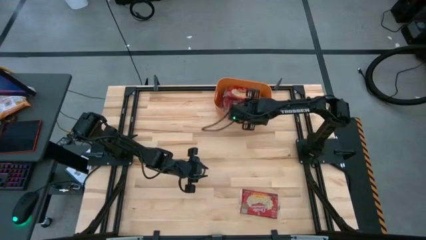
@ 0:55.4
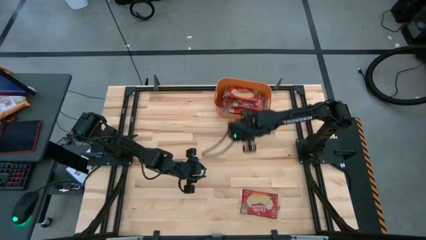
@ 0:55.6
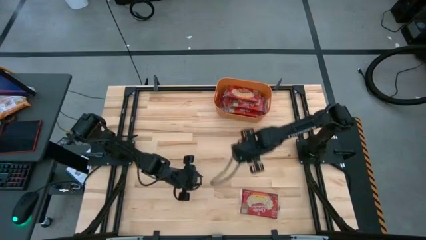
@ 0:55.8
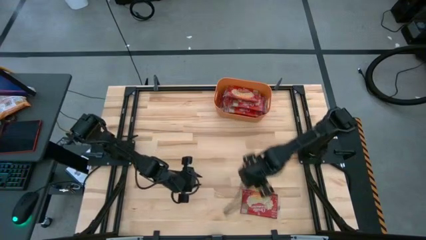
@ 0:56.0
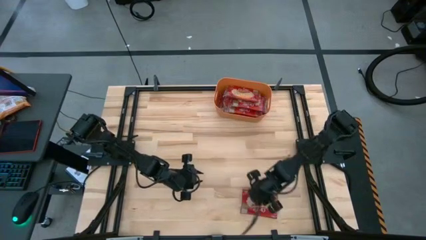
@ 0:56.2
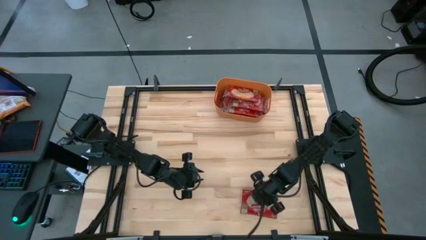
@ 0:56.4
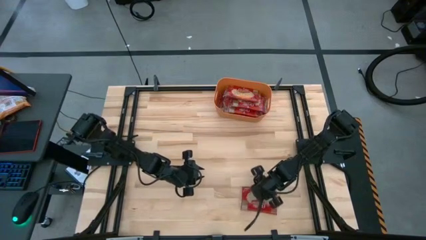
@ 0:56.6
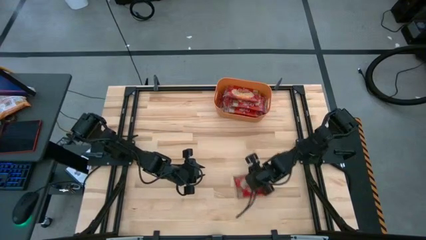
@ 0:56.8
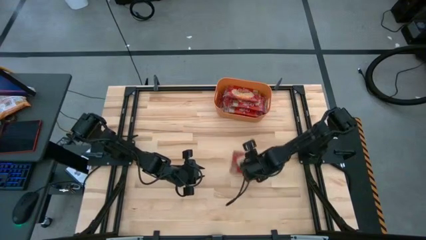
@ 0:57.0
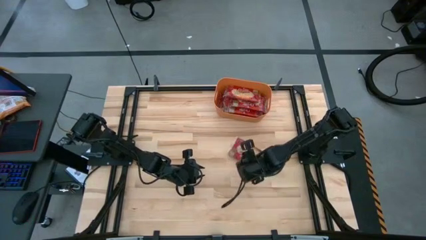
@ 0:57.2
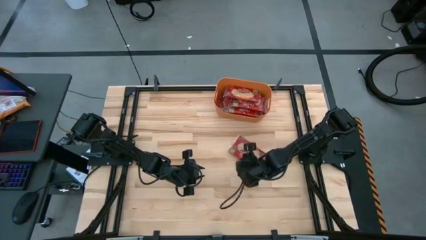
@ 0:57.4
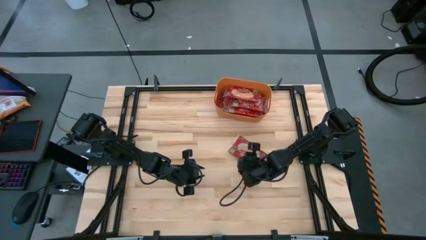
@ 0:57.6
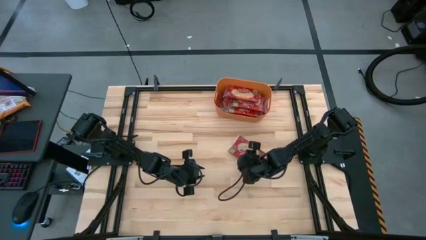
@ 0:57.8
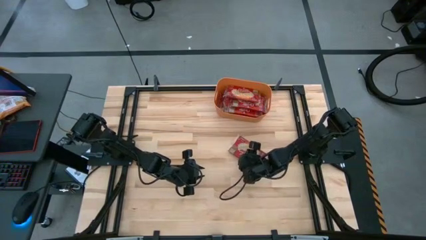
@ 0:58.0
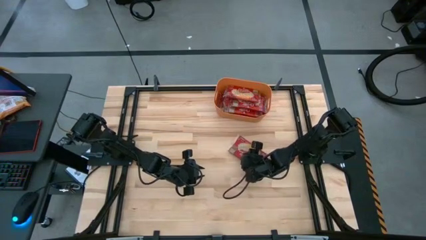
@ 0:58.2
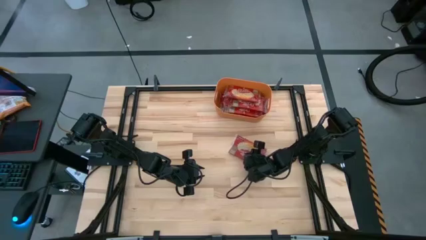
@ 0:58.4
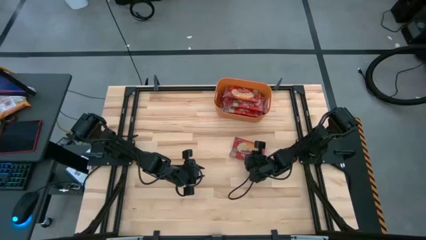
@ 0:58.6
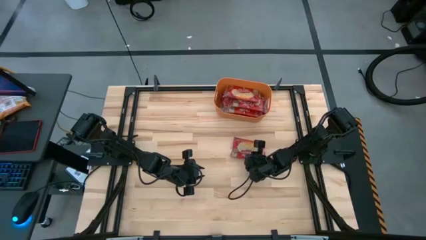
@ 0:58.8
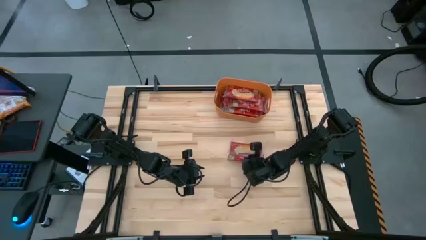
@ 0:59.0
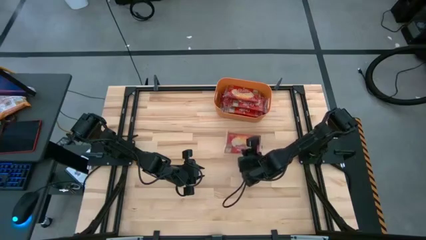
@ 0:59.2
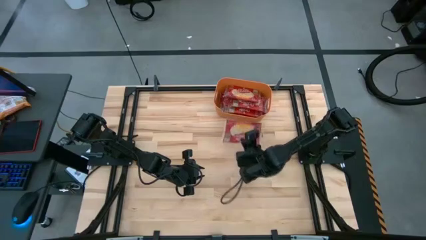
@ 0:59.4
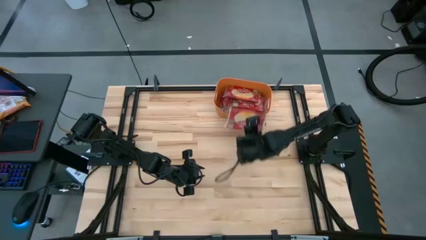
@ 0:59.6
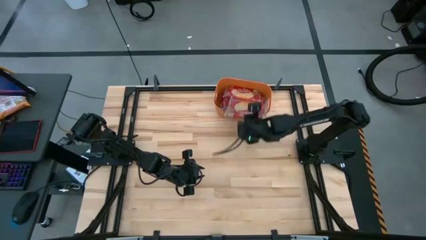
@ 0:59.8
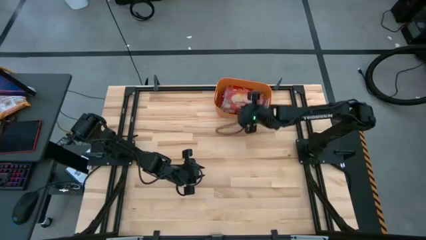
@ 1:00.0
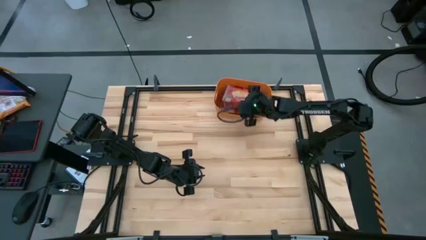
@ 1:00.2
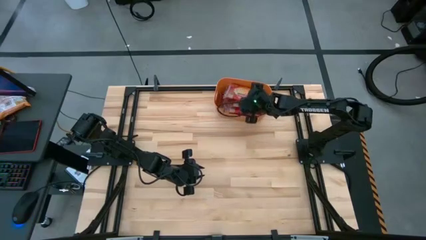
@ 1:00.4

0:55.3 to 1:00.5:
Task: Sort popcorn bags into baskets
Put the popcorn bag into the bin

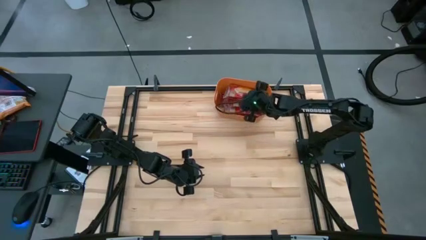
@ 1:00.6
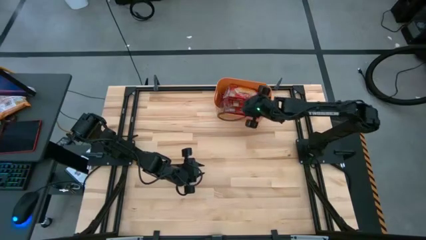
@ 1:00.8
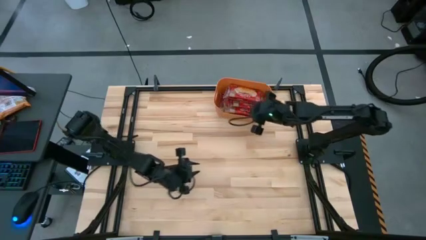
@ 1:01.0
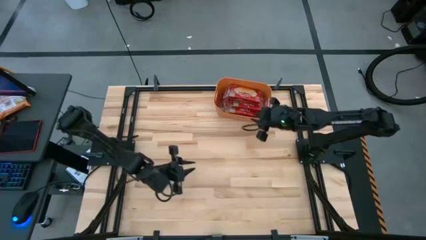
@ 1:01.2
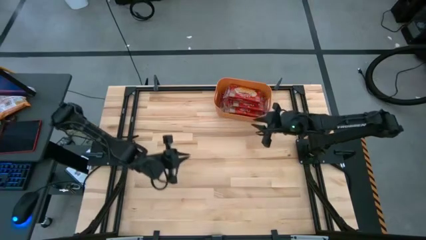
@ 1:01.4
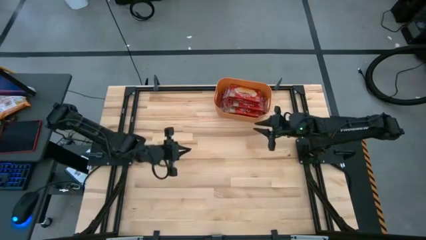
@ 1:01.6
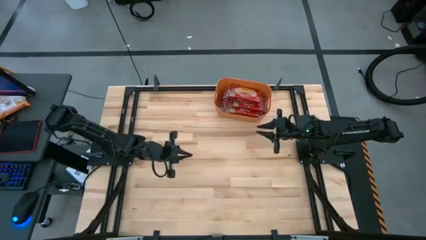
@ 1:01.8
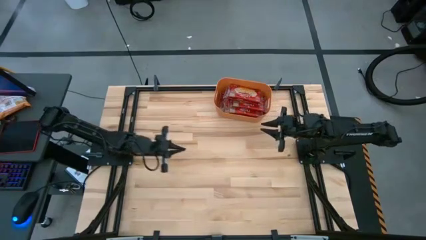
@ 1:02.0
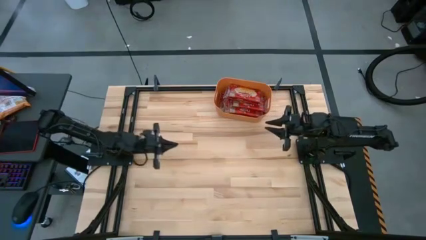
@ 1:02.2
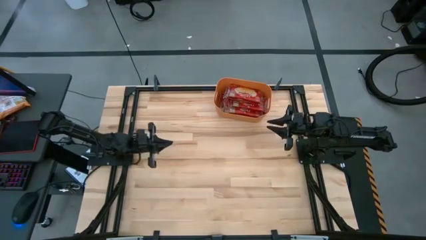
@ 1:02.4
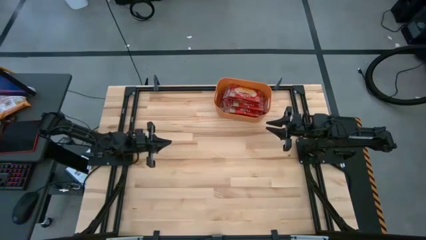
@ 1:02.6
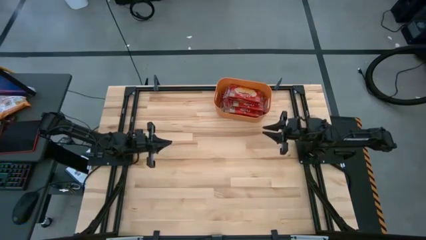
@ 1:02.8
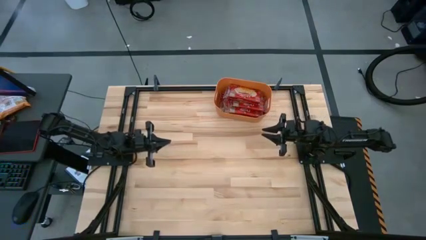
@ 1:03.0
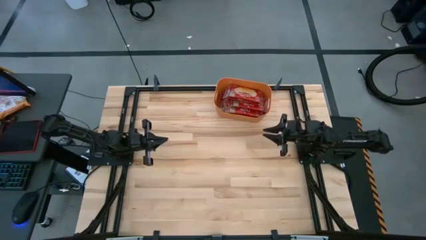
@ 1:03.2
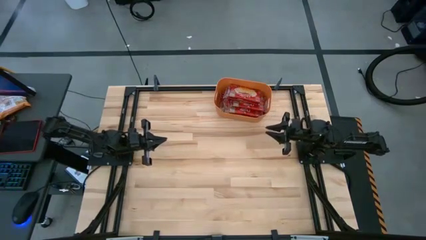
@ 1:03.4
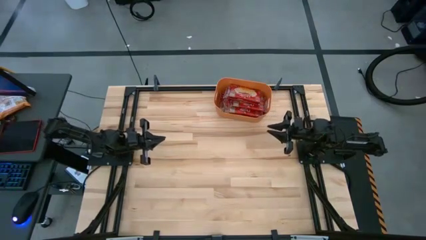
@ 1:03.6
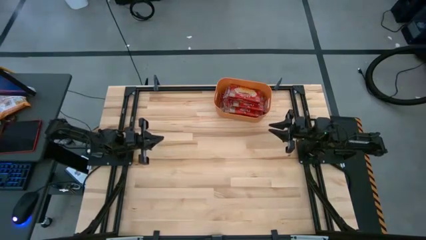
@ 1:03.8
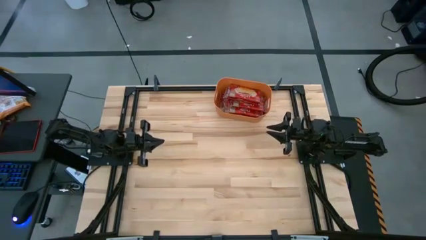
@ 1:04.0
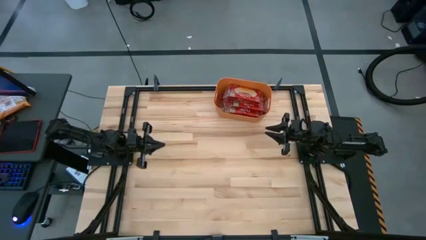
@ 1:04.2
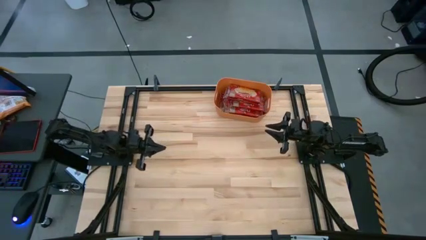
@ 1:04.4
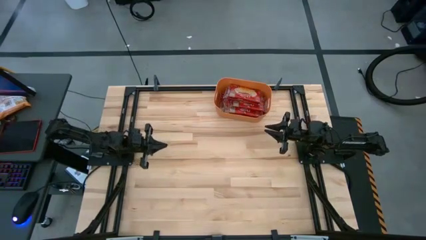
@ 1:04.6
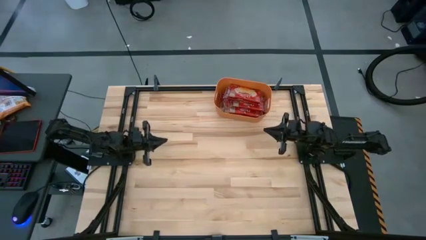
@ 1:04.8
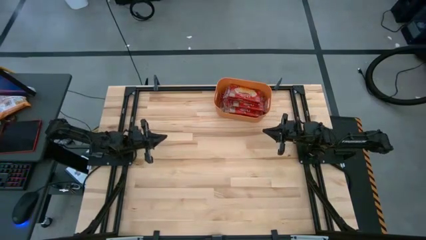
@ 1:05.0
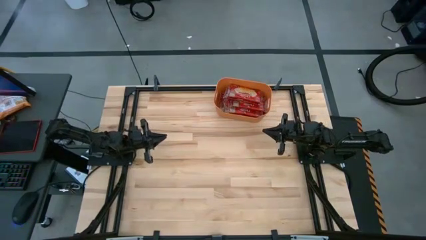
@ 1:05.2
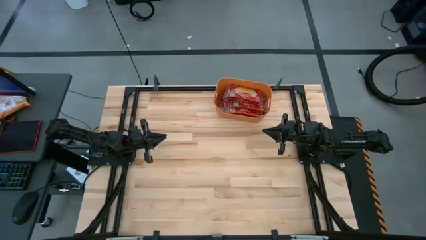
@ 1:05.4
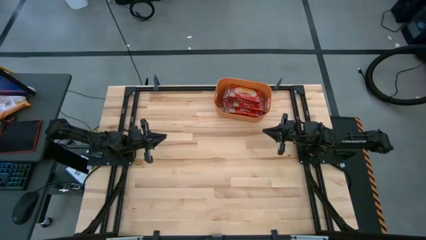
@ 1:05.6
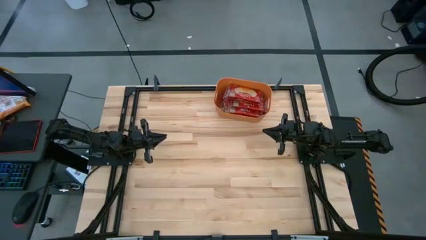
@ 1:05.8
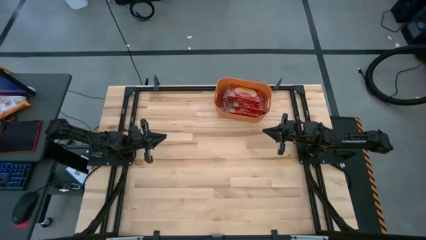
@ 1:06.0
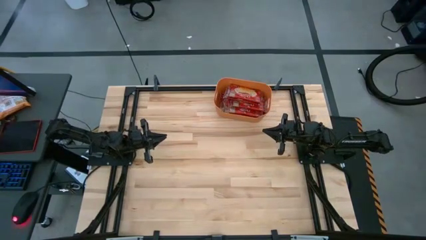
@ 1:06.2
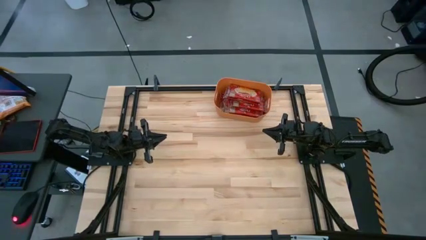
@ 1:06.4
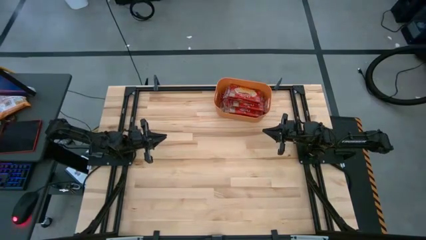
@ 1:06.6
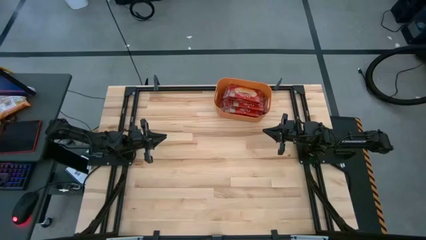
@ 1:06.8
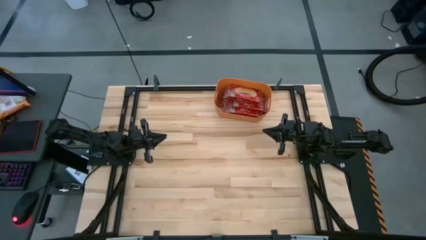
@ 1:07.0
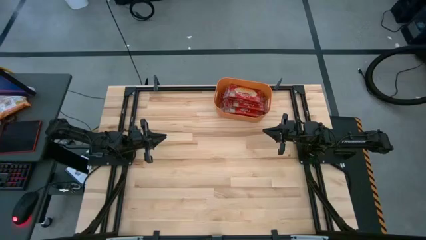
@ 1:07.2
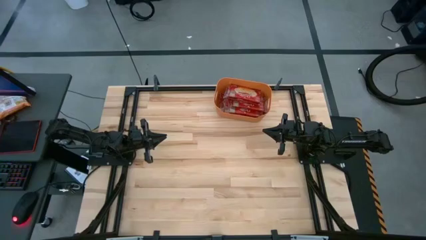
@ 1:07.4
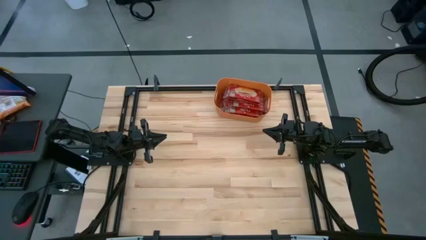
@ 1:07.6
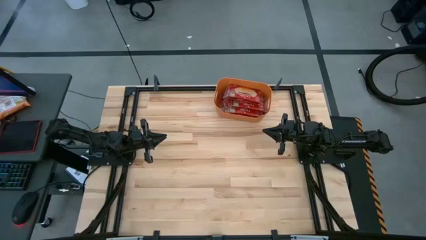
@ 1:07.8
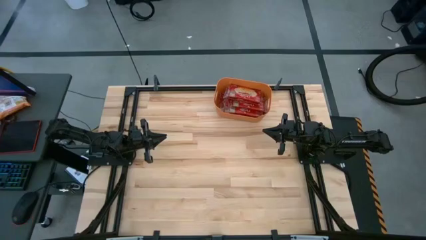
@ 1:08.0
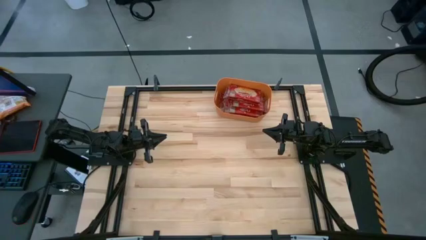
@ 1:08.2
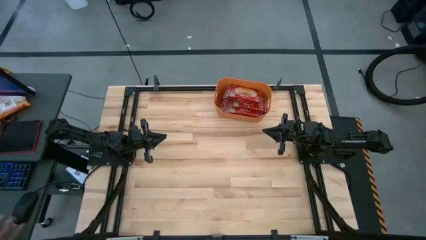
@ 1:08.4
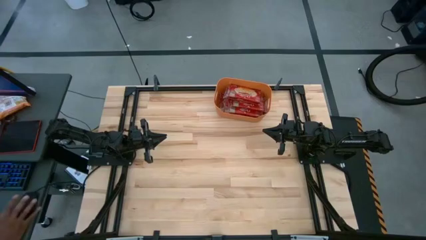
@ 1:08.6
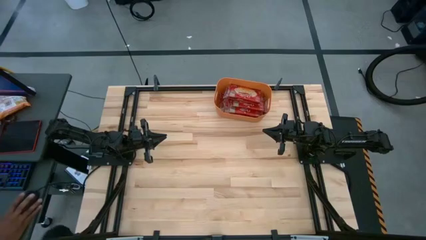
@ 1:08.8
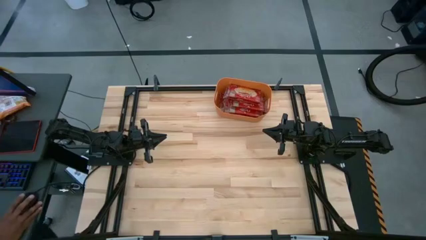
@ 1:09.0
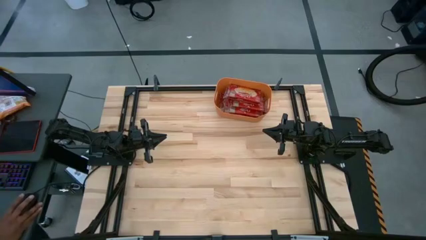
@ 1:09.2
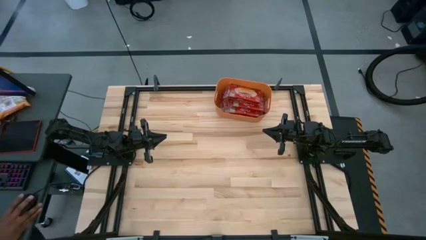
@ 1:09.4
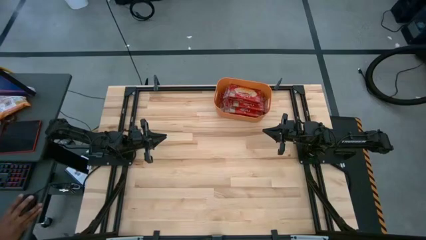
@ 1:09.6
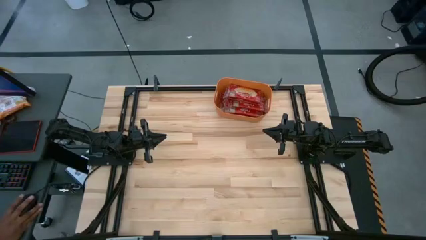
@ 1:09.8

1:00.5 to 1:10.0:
Return to Home Position
